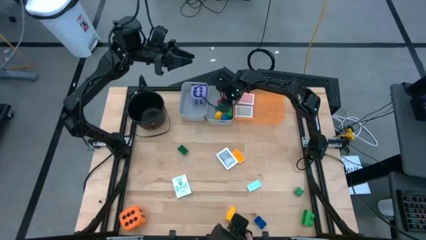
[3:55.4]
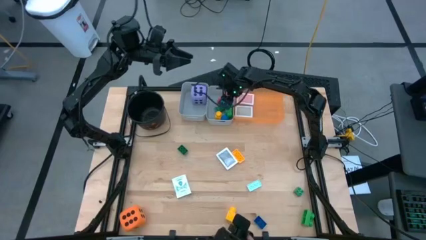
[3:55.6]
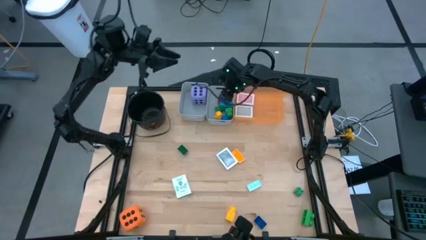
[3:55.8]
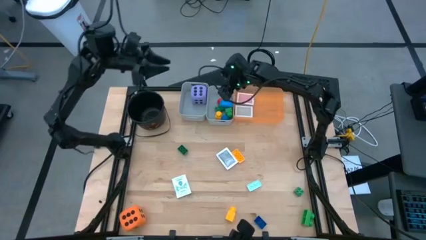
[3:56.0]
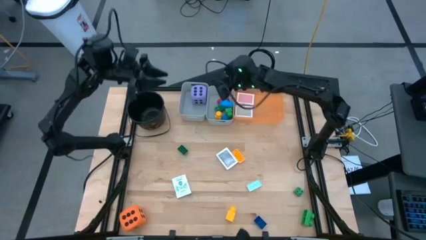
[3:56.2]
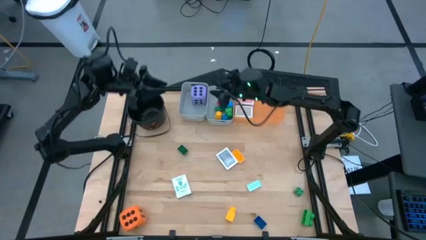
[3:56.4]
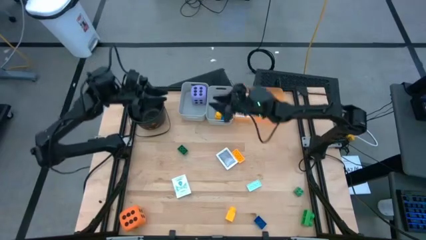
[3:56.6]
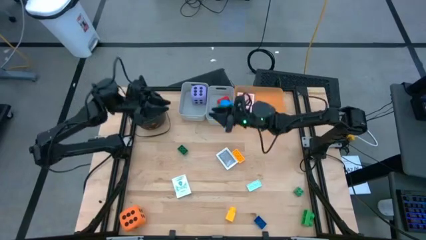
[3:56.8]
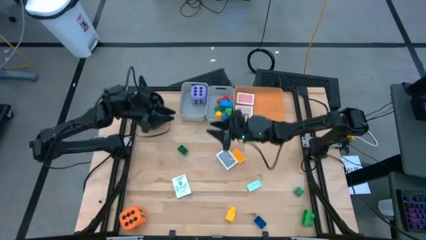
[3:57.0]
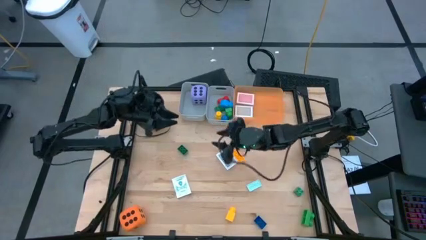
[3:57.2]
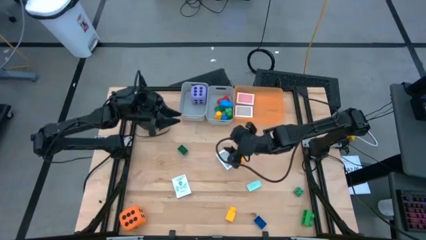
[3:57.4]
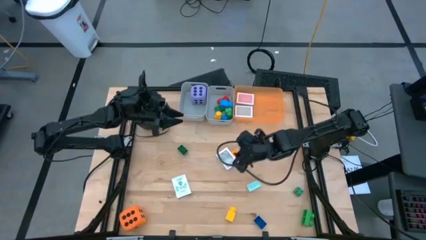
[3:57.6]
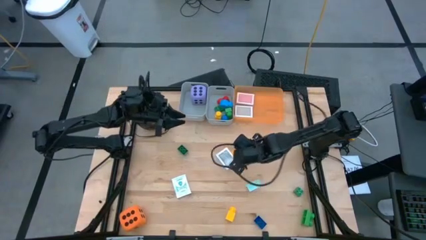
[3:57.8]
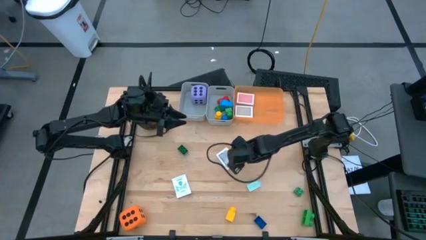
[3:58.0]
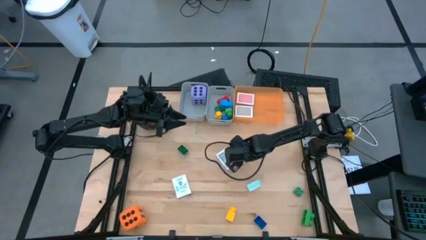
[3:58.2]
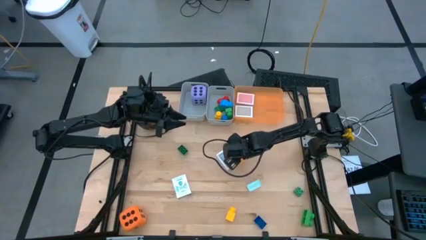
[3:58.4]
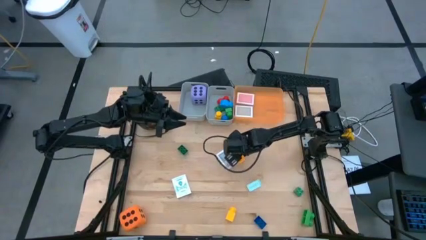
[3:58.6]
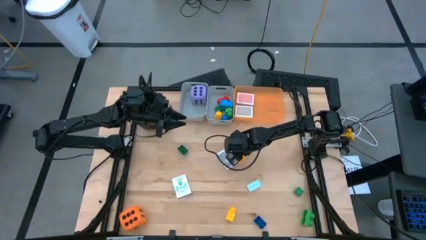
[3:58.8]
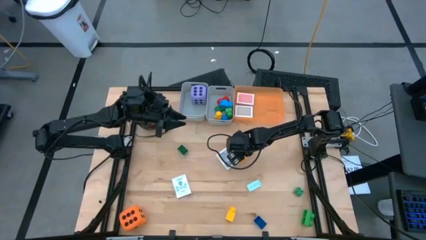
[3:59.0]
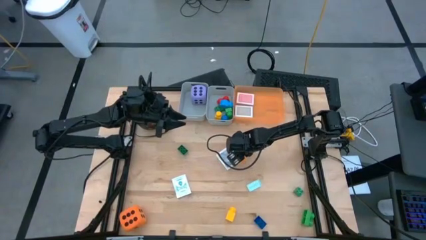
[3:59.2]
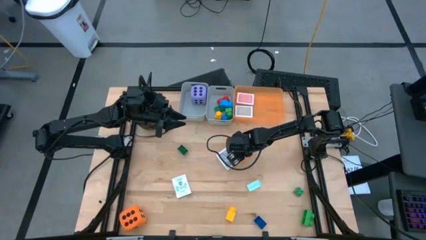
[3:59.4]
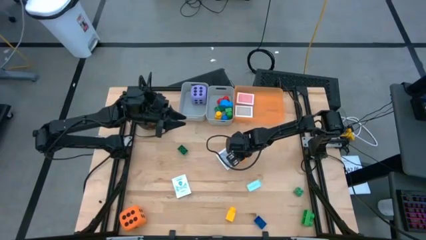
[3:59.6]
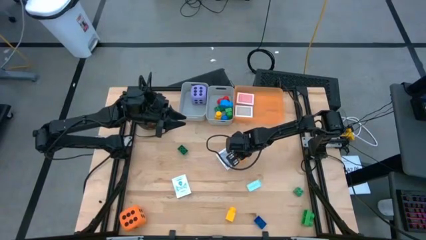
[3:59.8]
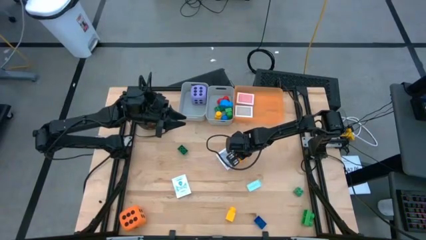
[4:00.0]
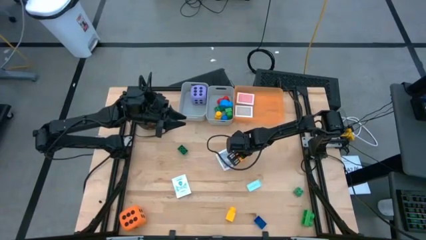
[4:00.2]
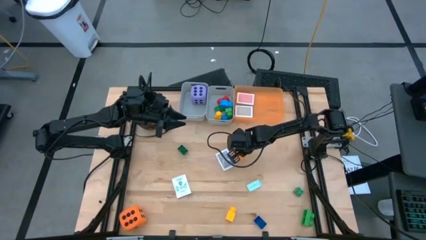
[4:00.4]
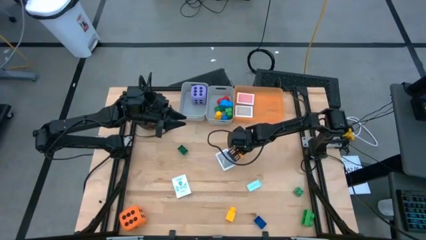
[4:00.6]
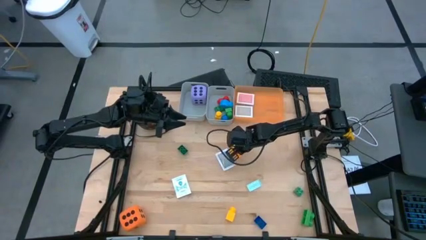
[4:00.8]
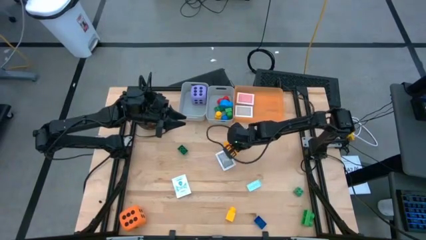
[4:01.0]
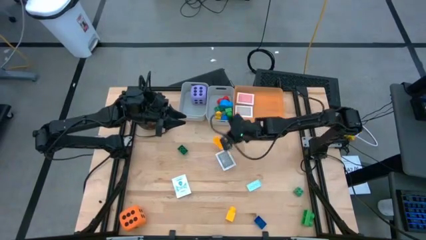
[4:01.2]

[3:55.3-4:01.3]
Task: Pick & Place Toys
Put the yellow gamepiece into the right gray bin

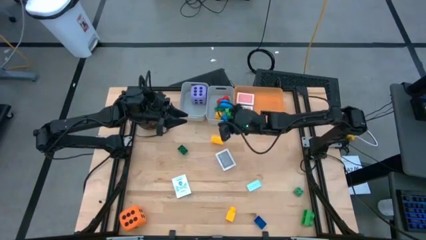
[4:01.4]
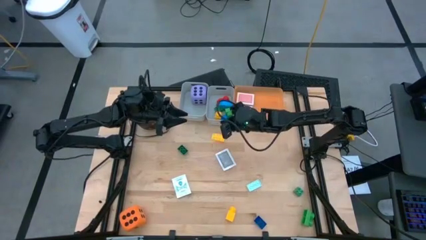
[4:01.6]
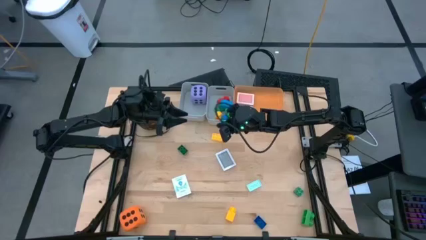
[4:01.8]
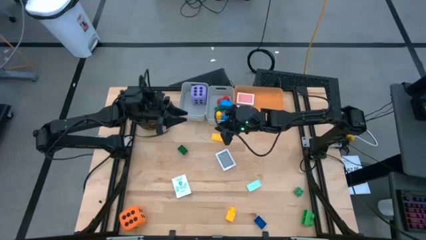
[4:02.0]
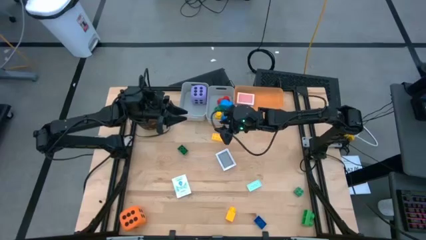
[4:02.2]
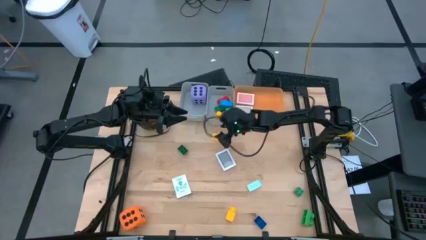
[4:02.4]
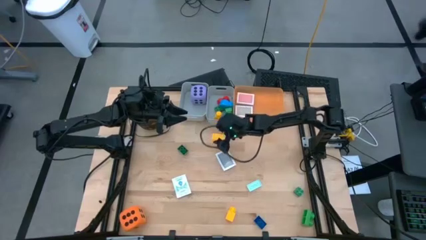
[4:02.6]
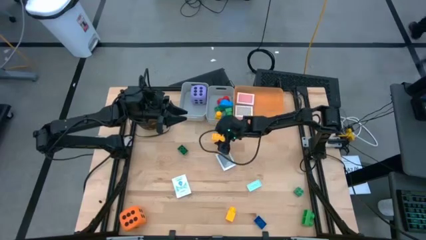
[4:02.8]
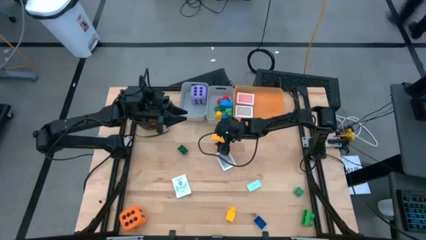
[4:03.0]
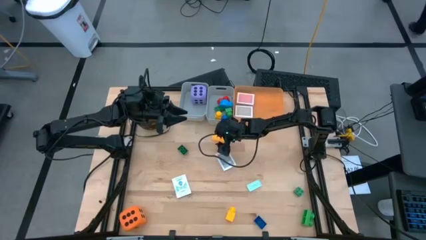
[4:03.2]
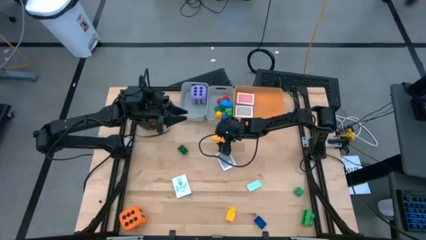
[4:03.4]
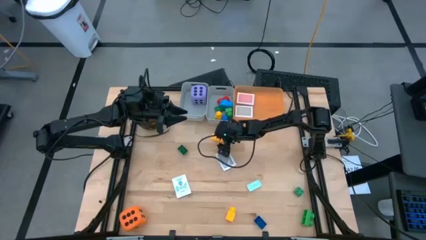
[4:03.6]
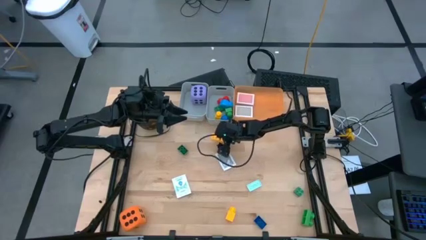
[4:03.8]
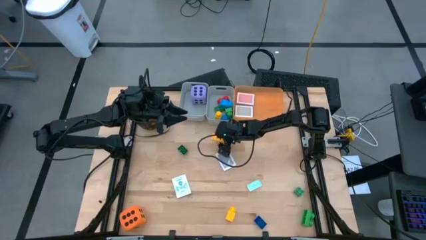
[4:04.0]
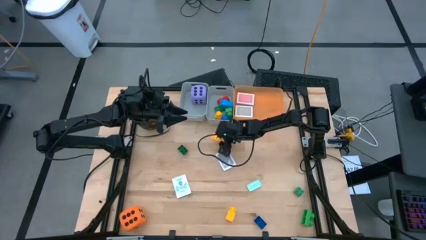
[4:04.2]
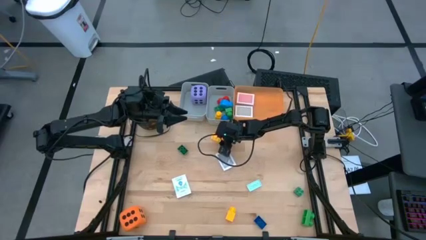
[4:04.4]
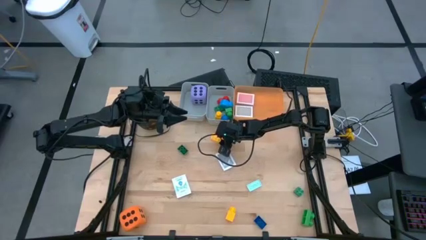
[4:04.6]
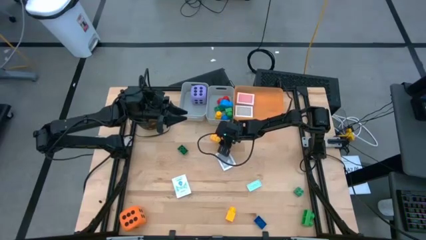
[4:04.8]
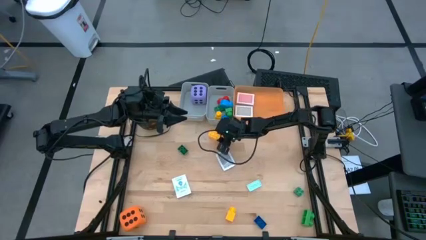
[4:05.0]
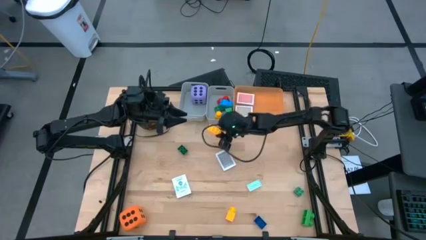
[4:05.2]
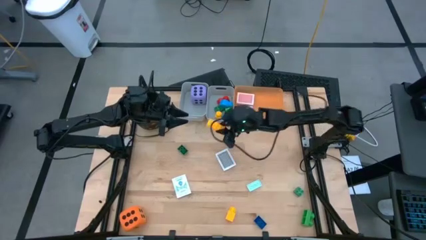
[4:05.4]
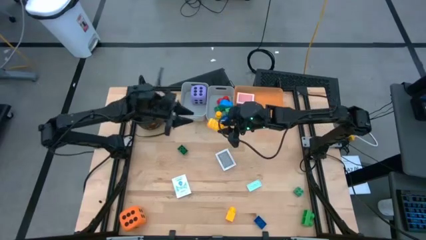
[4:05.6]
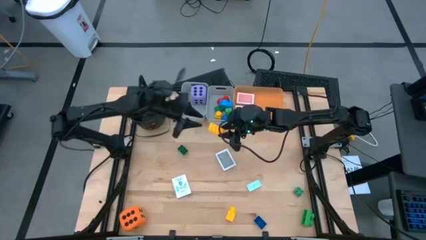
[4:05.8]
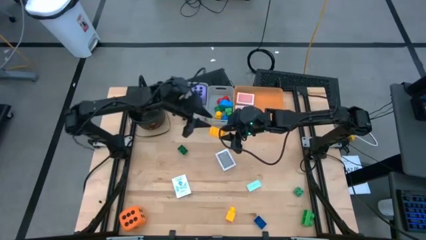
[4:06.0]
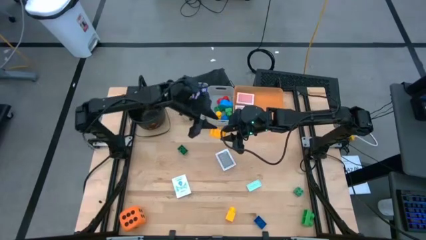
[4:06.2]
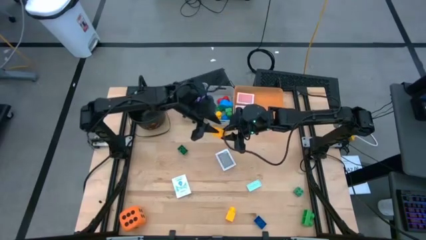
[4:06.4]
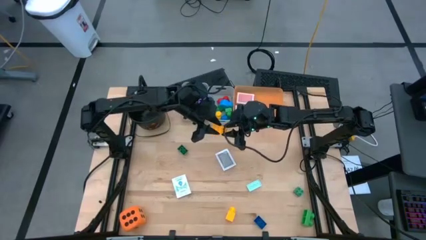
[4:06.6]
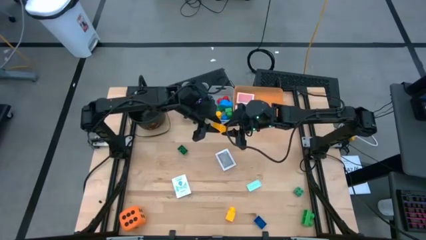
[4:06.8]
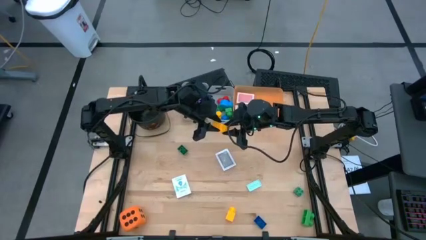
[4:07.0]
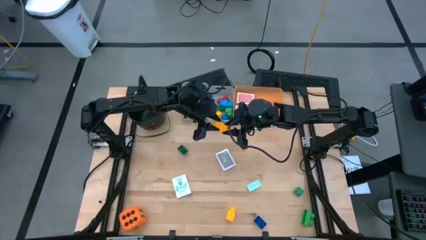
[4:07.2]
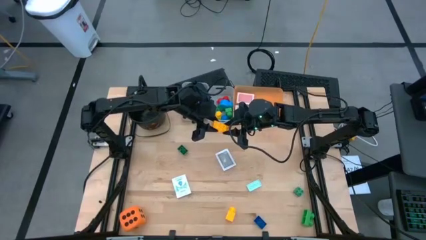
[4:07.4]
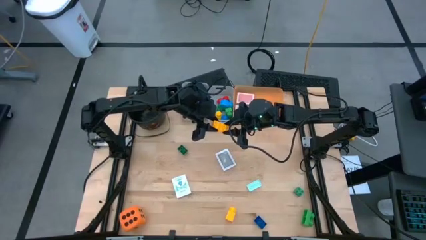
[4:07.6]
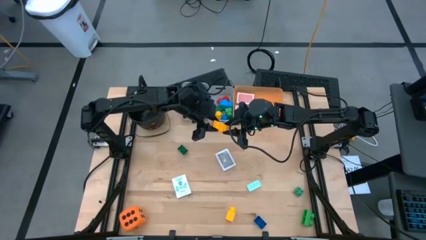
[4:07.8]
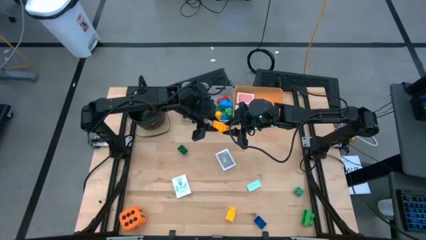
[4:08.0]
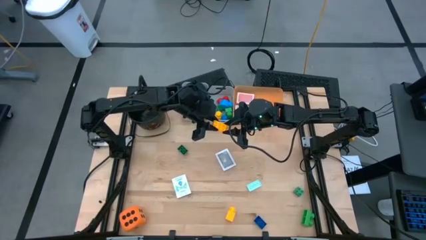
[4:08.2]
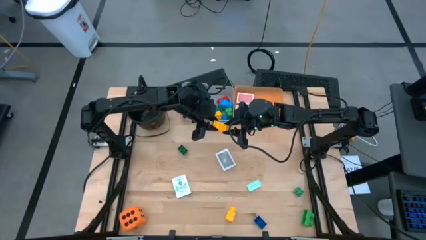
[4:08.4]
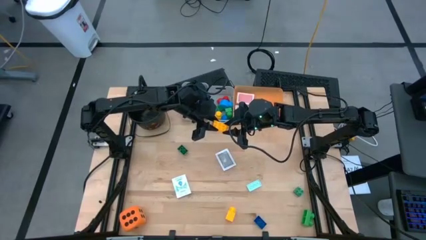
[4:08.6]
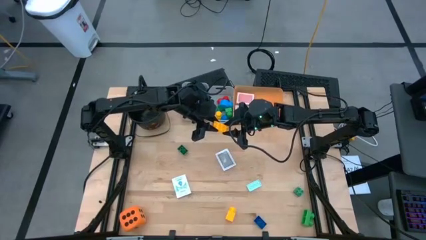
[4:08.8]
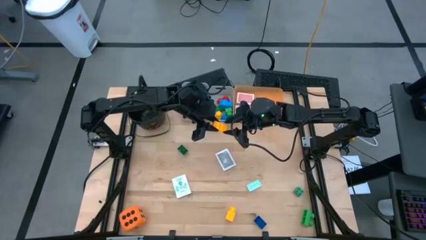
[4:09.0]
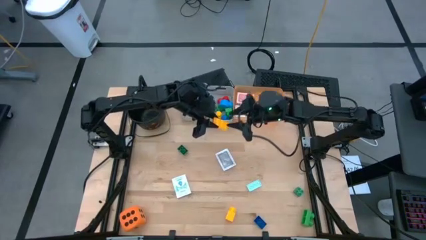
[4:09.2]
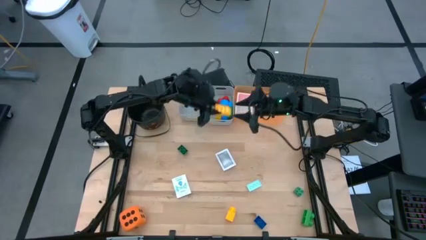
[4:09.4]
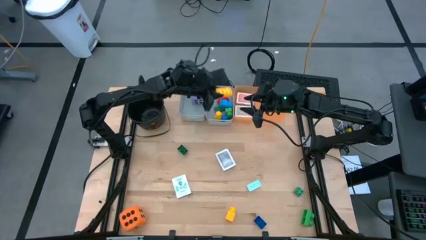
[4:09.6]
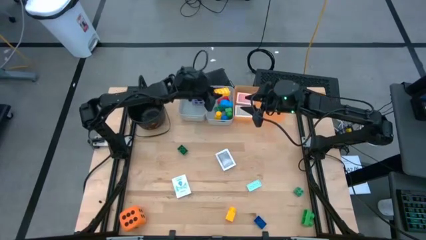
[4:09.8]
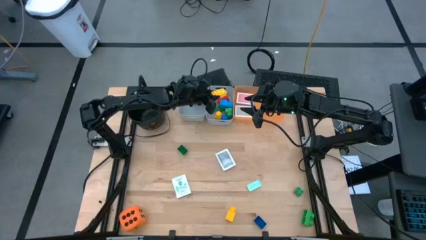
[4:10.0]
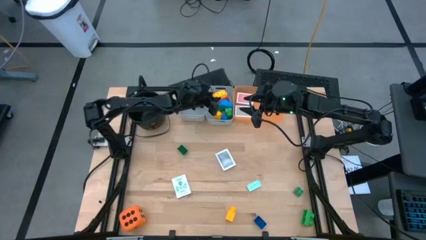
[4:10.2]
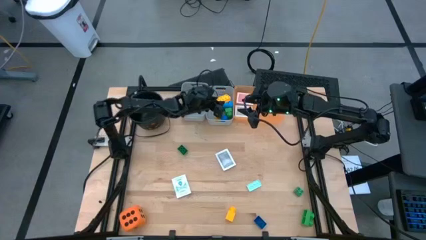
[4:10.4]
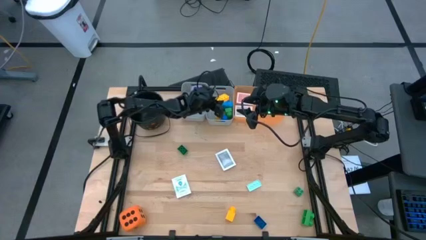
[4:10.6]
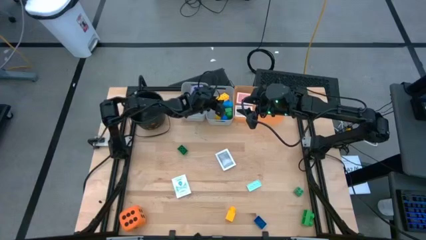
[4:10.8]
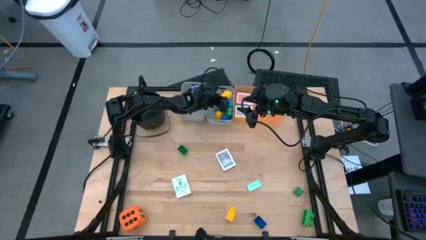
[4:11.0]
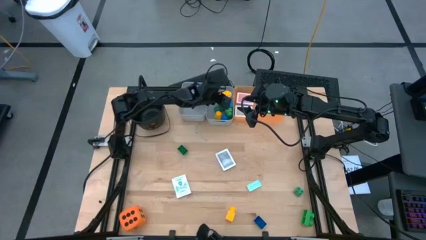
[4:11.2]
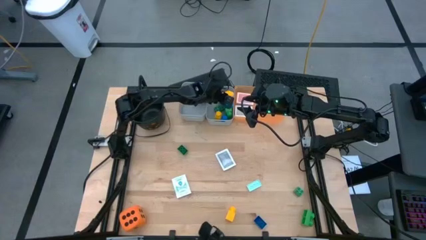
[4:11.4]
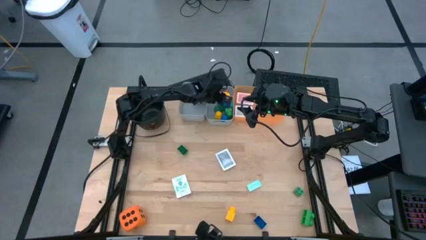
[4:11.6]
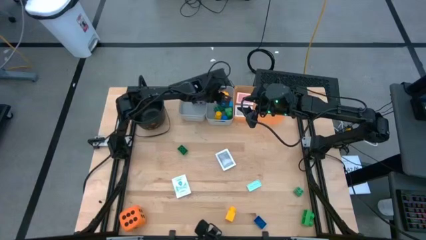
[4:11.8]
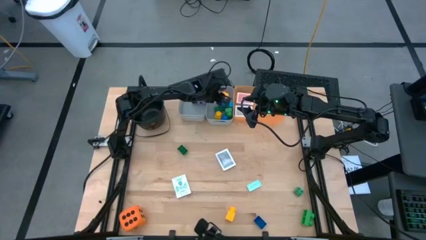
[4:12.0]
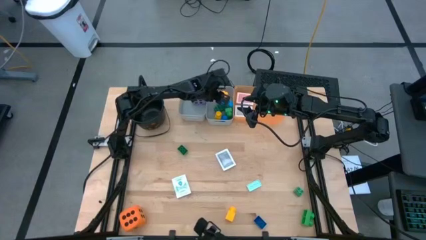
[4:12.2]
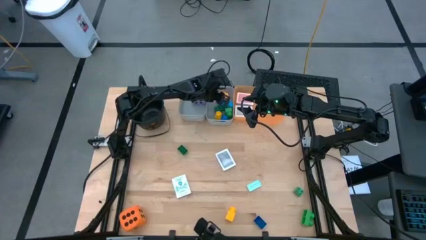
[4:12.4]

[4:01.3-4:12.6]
Put the yellow gamepiece into the right gray bin
